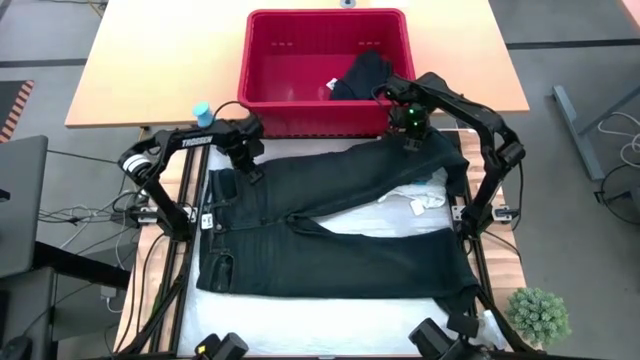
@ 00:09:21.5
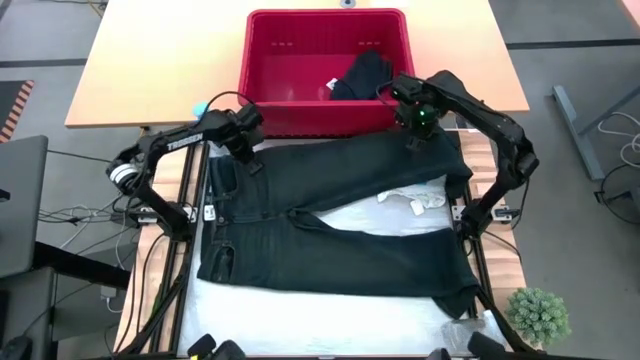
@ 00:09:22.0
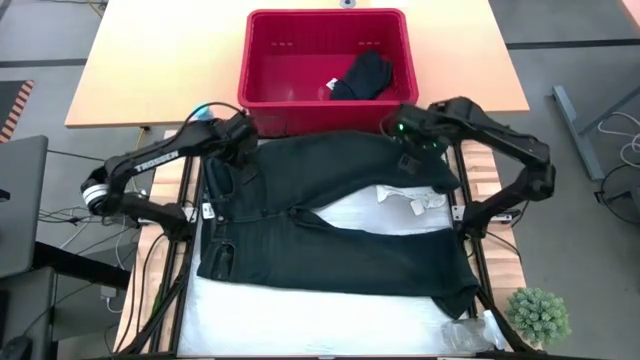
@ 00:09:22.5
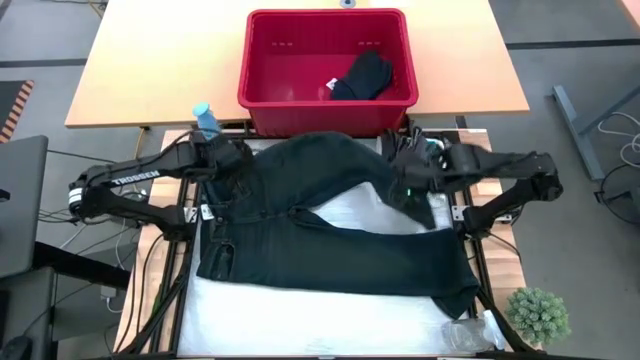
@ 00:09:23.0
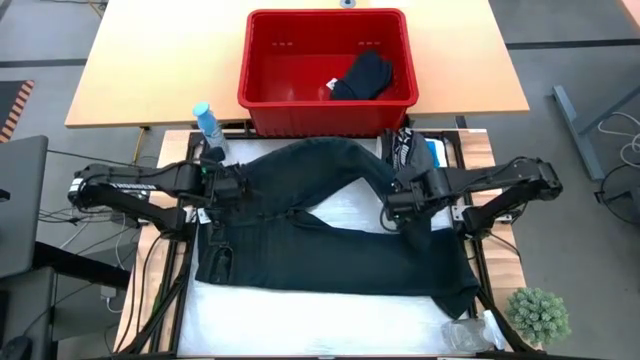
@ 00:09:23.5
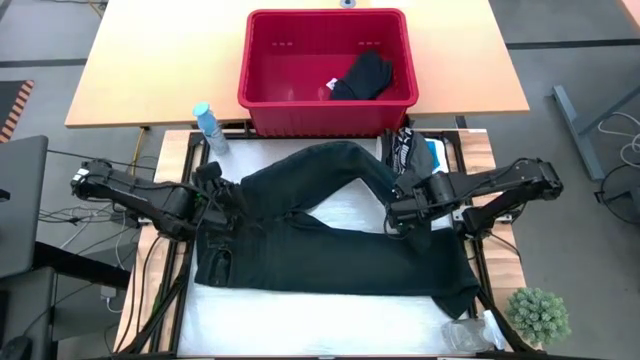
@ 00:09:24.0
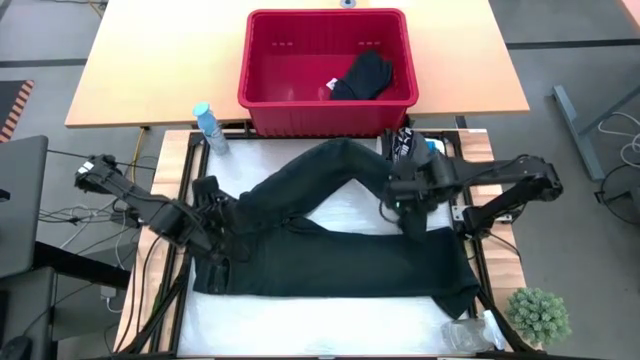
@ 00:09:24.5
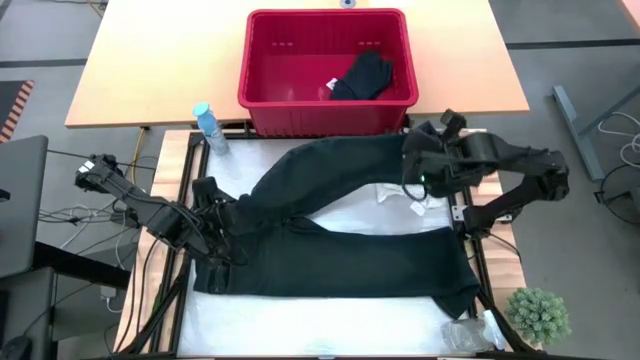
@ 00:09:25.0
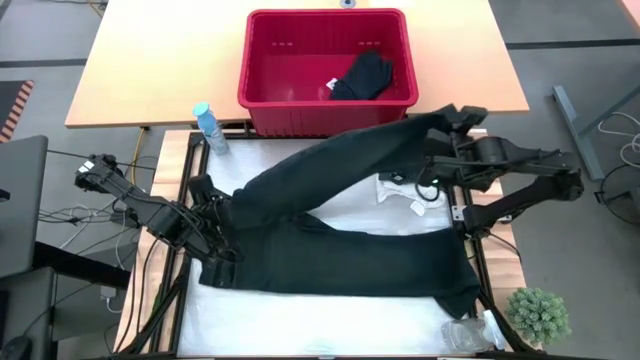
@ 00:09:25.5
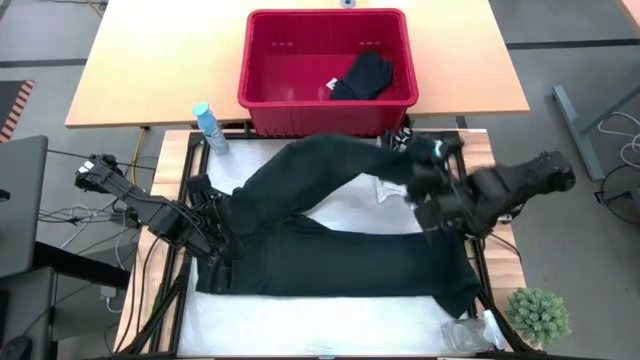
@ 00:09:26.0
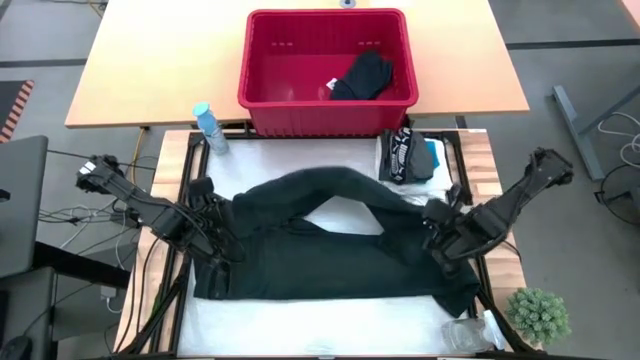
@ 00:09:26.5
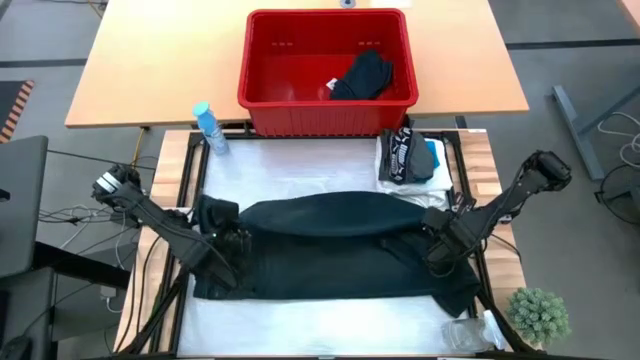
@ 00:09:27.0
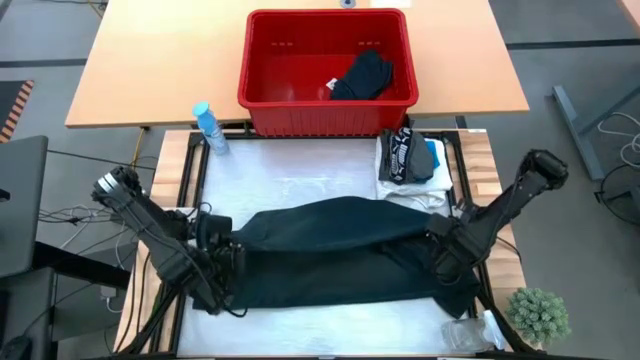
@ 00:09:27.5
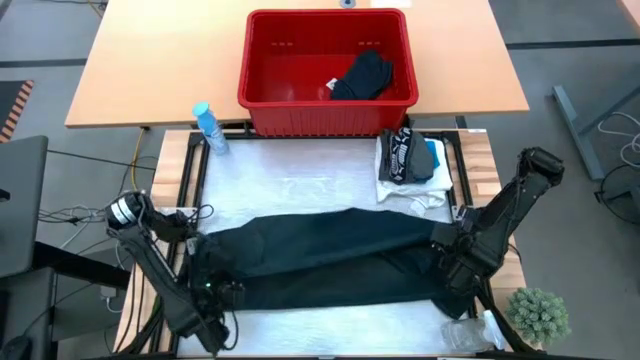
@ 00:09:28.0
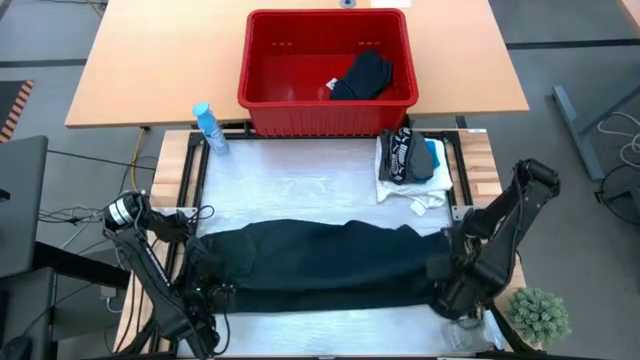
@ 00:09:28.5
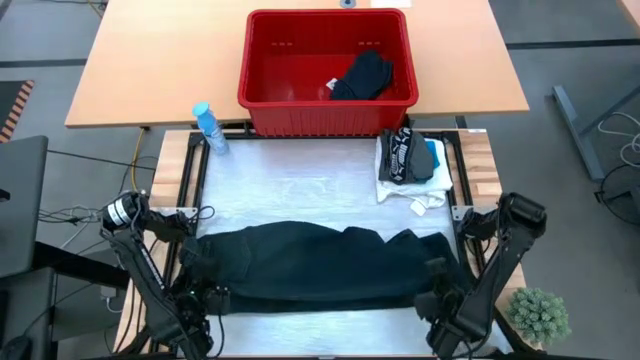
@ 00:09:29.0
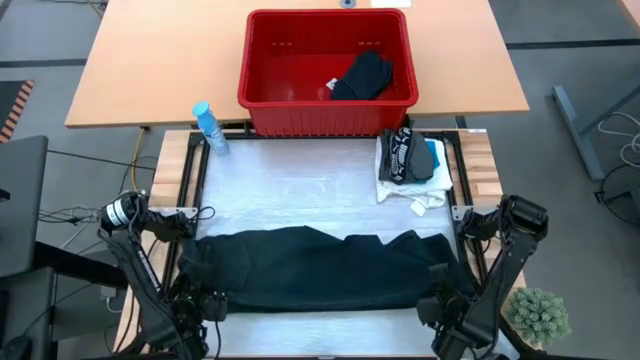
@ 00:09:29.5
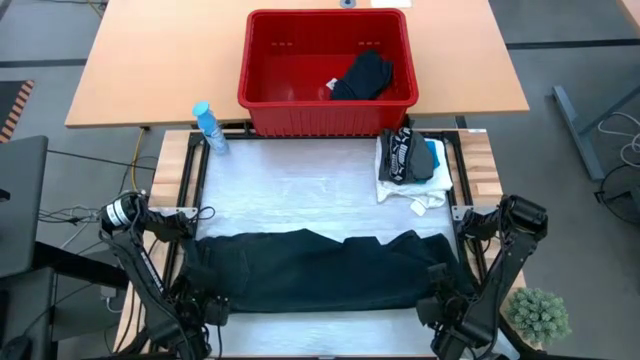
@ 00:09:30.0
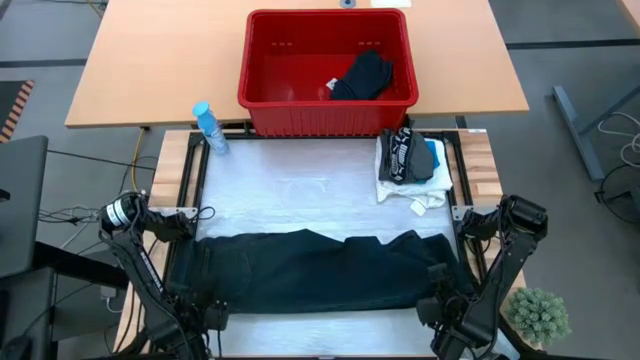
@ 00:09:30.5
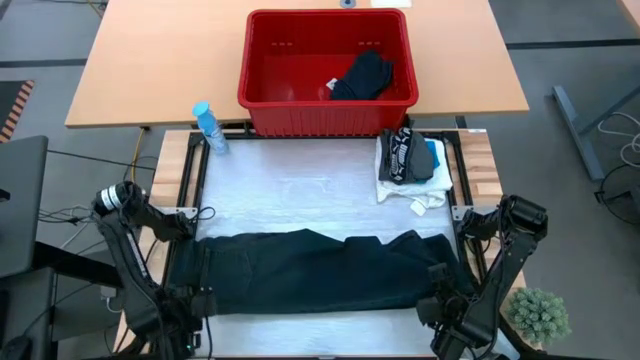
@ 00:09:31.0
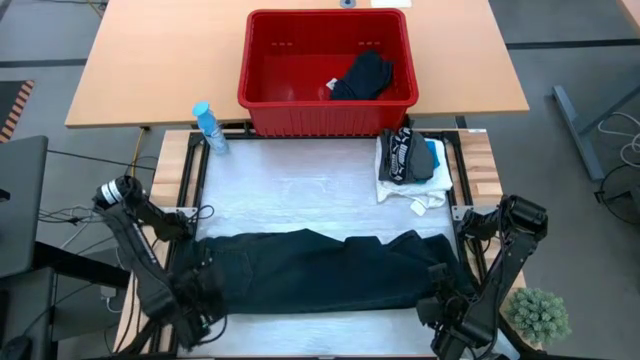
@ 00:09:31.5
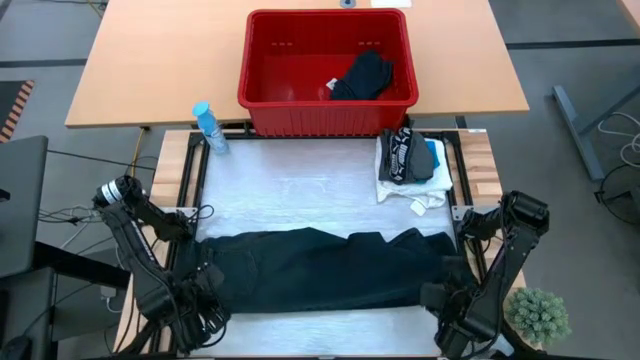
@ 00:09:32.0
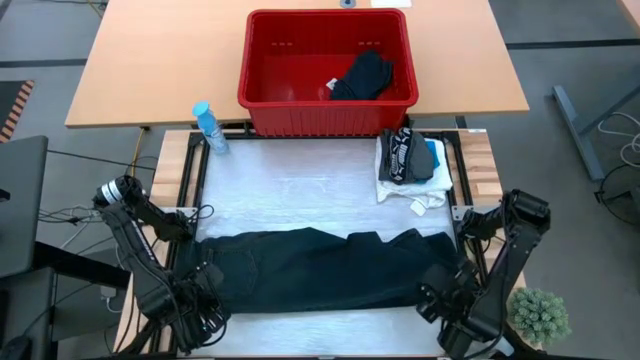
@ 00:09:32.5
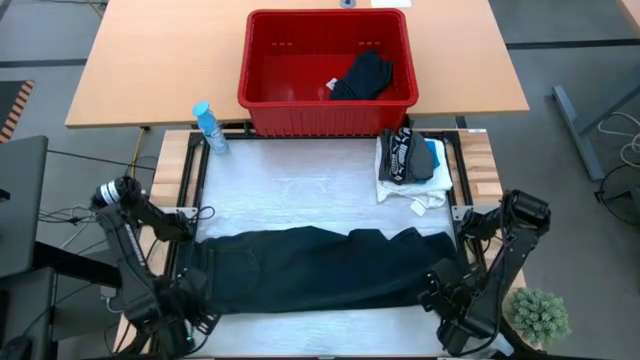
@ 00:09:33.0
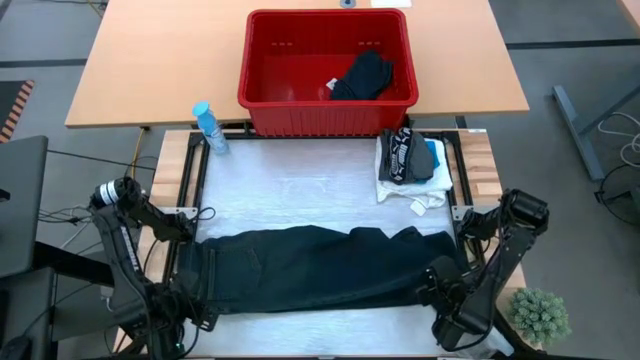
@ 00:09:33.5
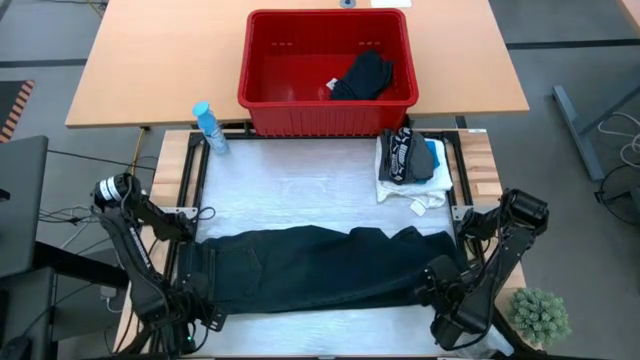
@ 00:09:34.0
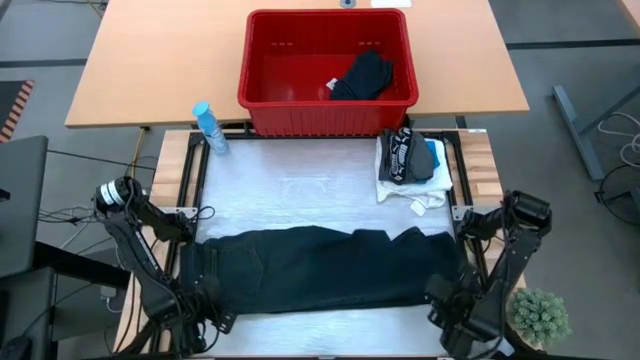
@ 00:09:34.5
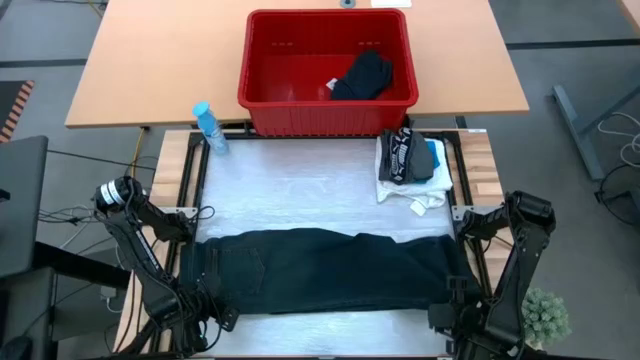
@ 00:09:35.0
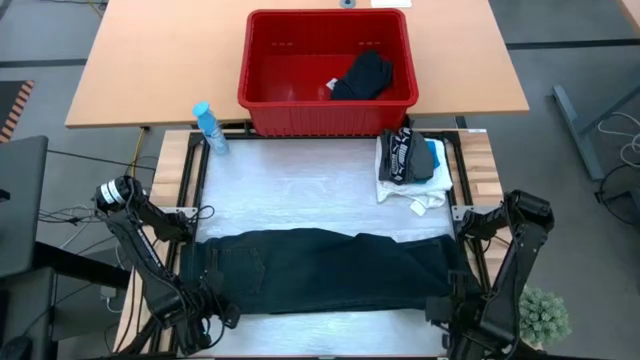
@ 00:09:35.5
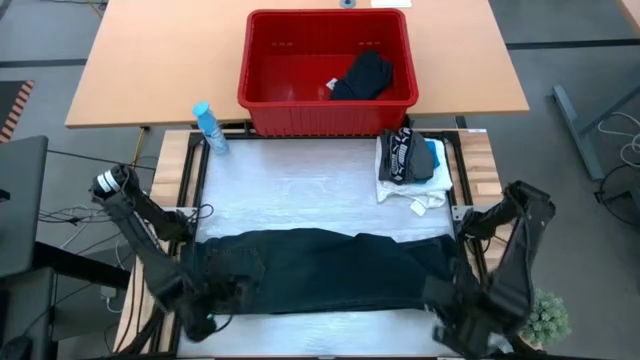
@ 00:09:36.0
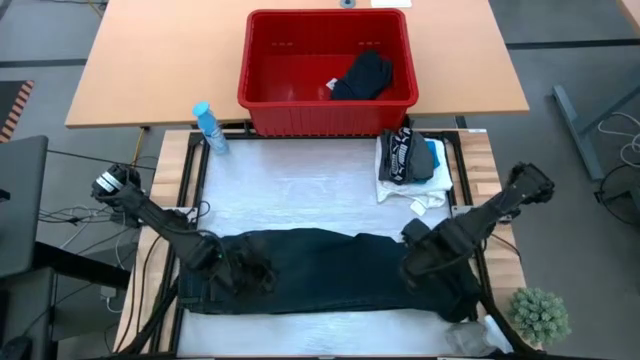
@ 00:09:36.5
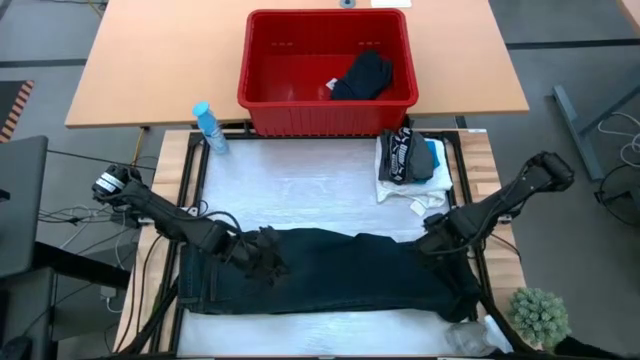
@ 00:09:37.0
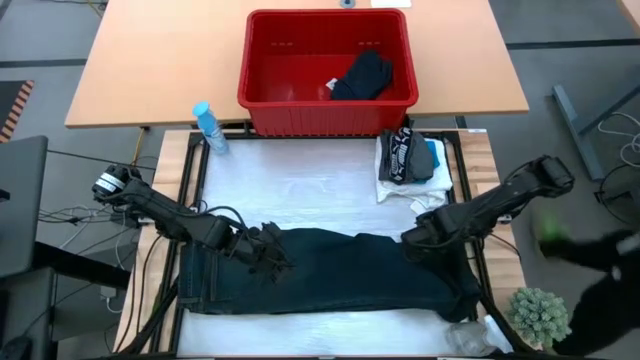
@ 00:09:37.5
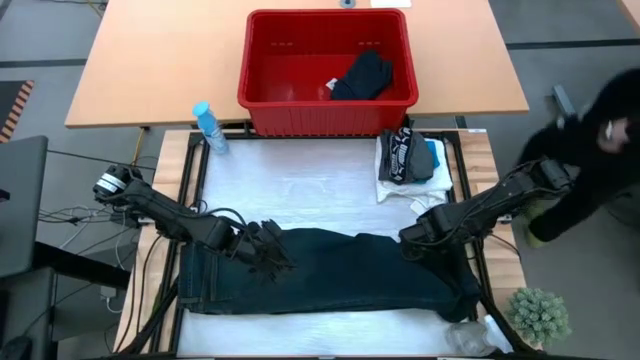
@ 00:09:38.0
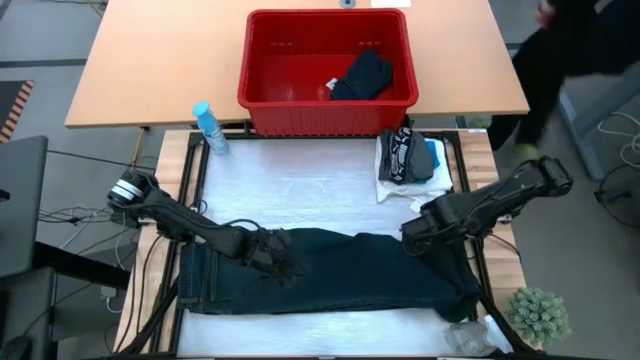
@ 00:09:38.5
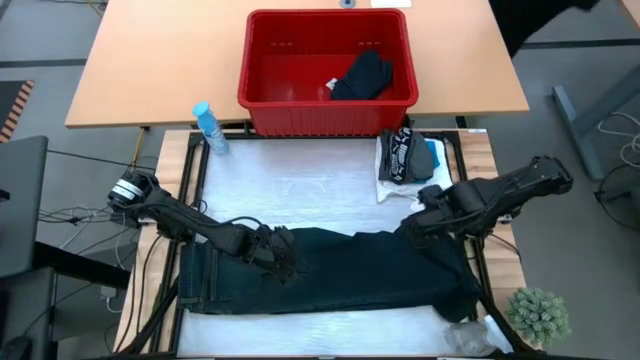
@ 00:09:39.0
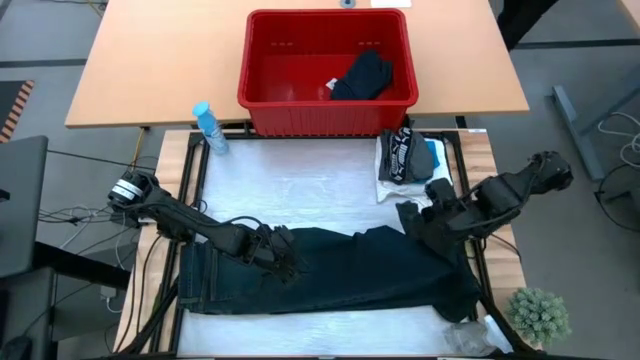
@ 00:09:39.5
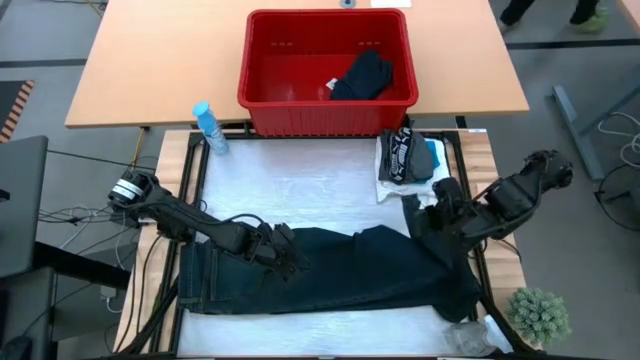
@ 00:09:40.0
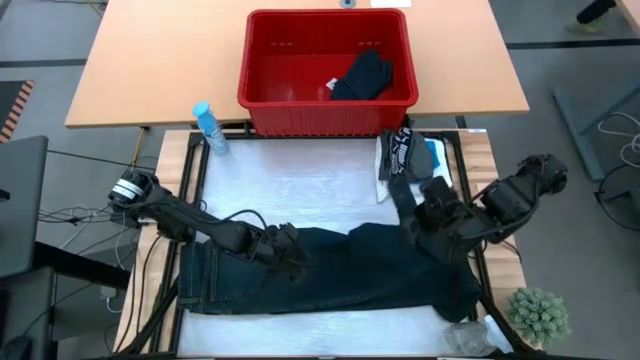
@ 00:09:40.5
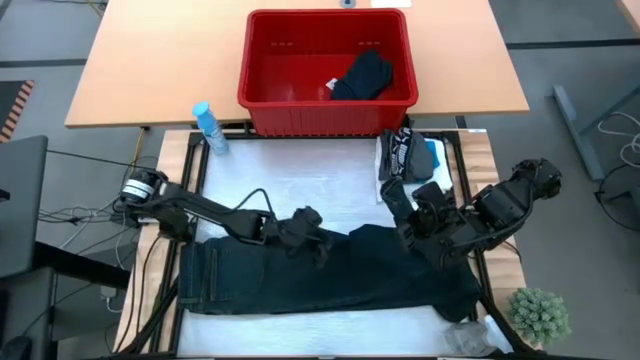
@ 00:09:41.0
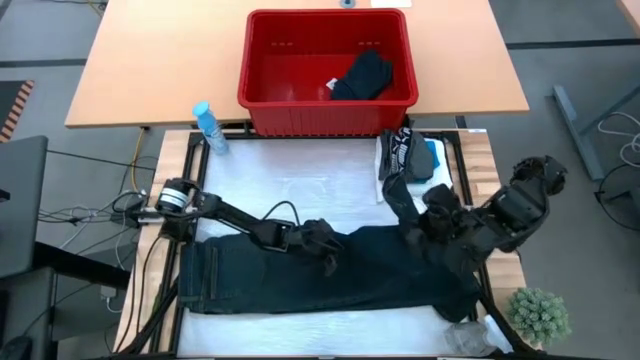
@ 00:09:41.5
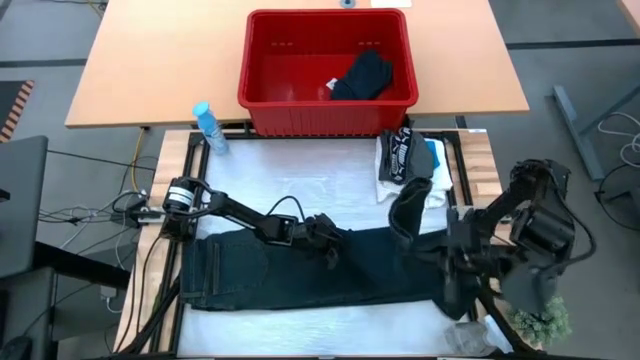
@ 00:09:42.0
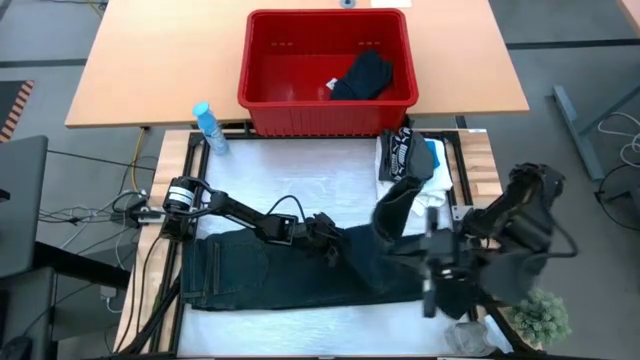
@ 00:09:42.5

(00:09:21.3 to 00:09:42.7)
Task: Fold laundry
Fold the blue pants

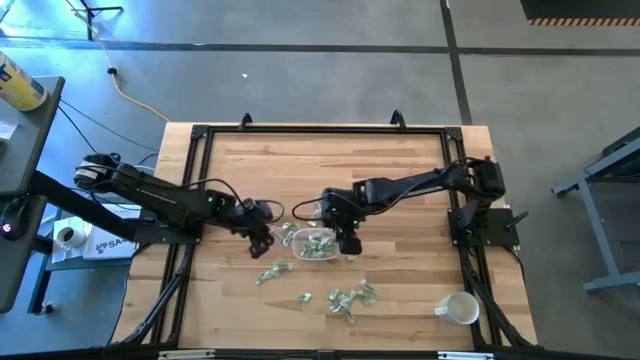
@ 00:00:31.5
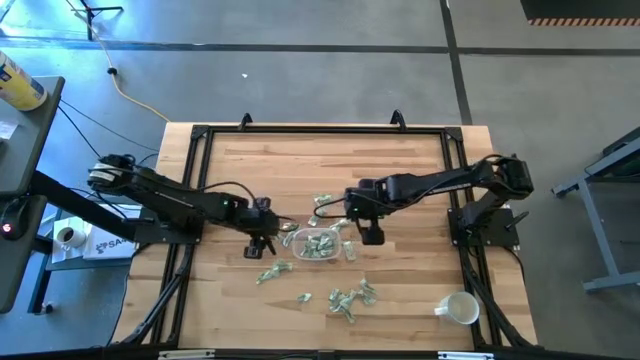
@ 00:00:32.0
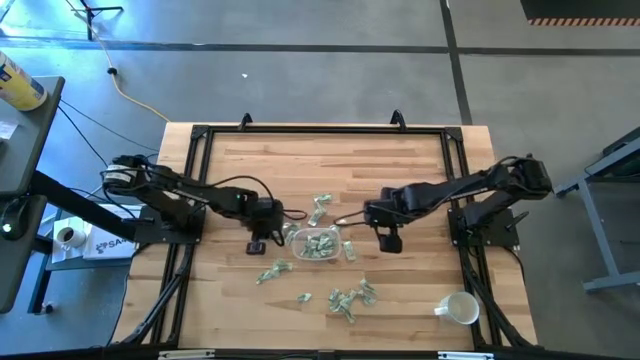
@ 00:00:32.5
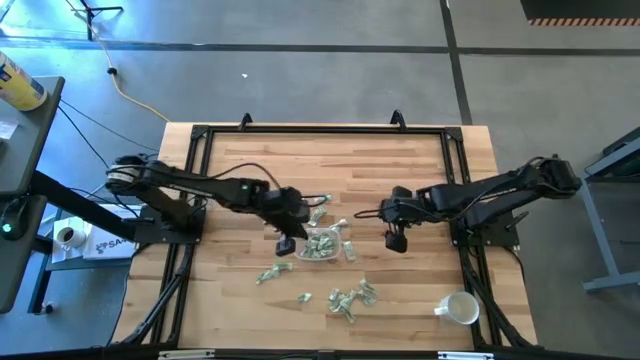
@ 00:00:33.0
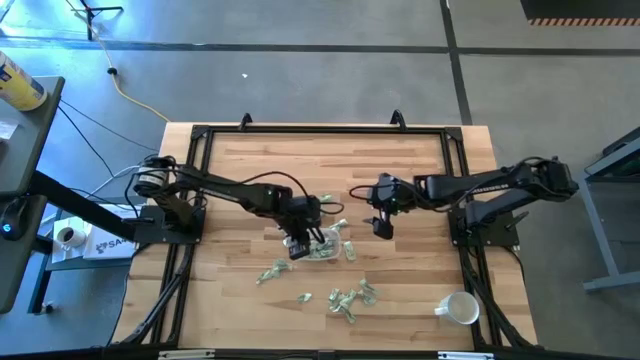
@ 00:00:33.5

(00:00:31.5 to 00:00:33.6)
Task: Pick and place Stevia / Truvia into bins
Put the green stevia packet into the transparent bin
